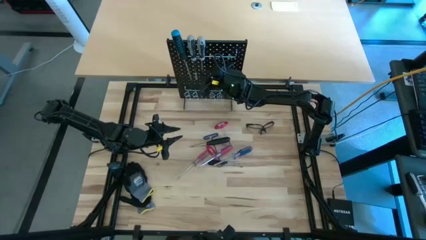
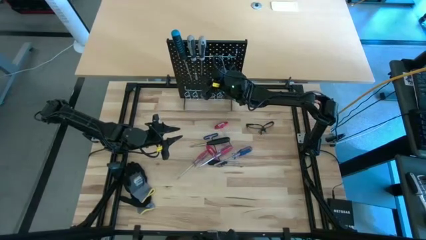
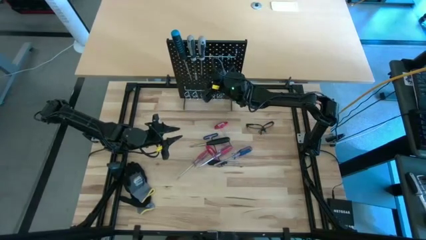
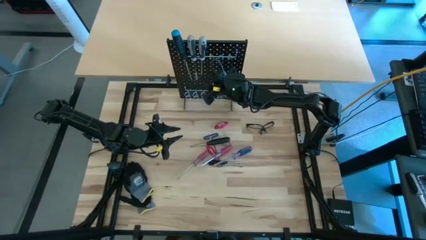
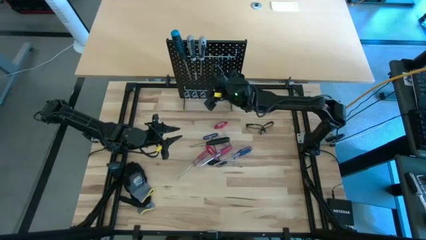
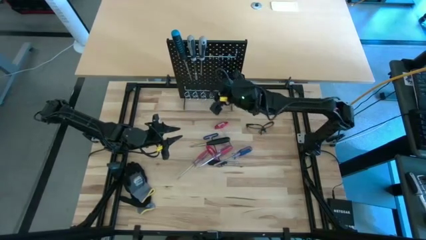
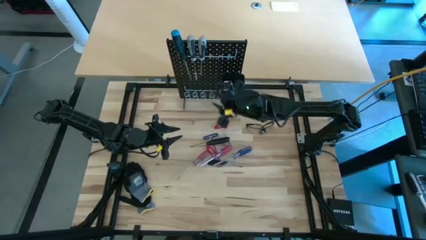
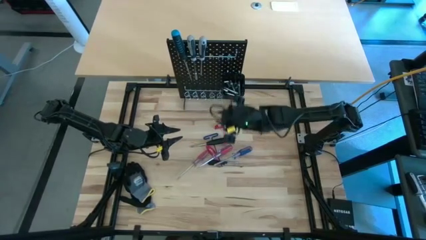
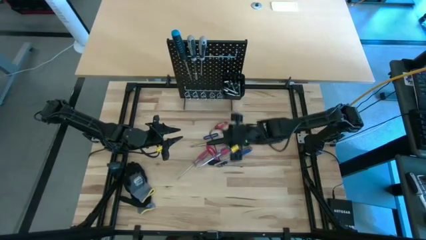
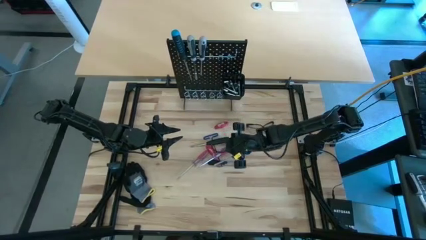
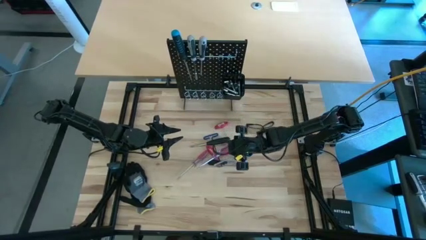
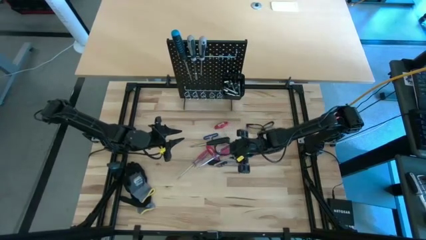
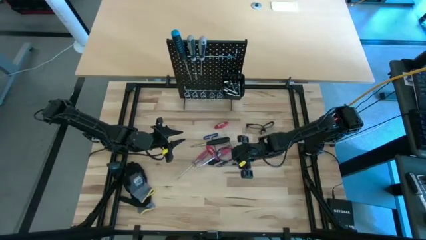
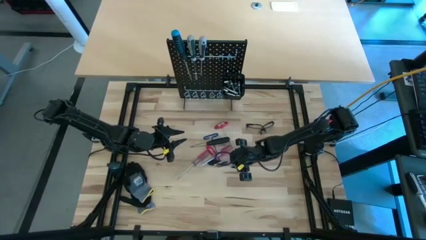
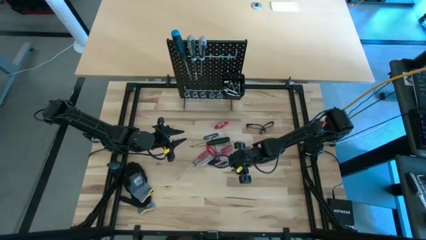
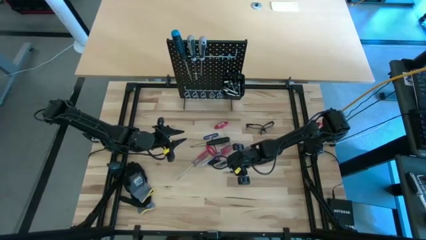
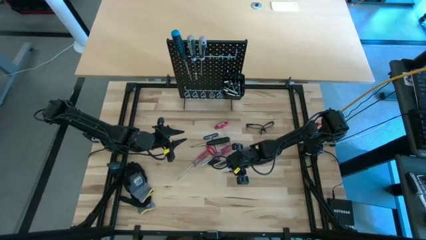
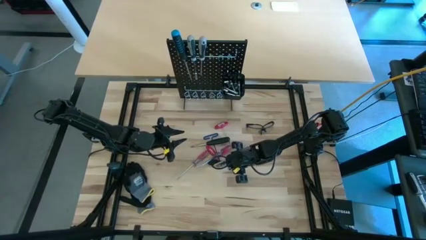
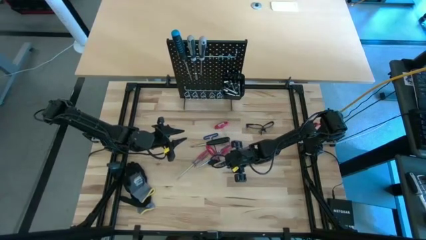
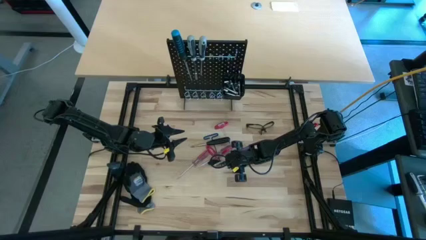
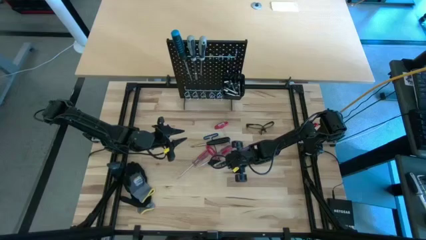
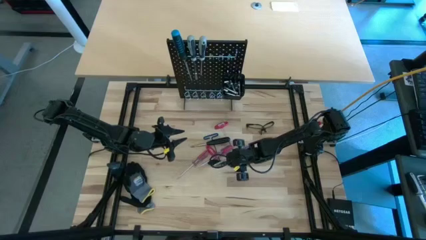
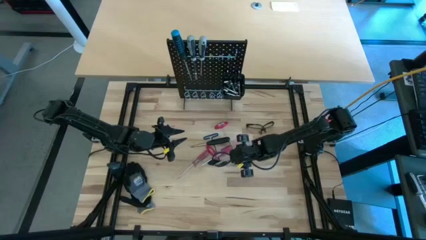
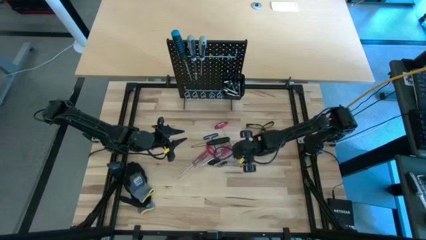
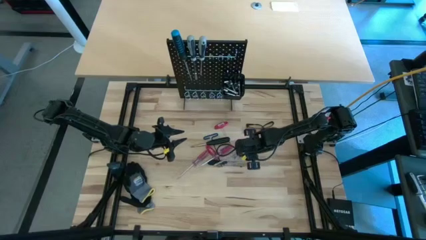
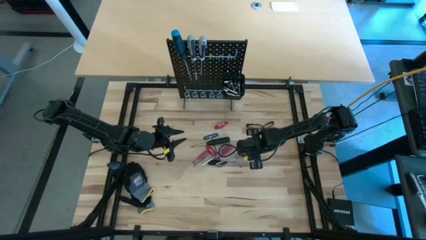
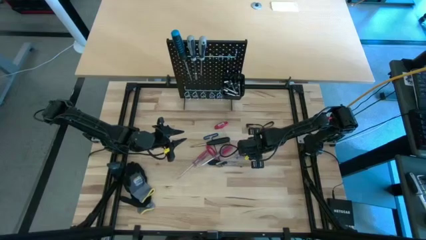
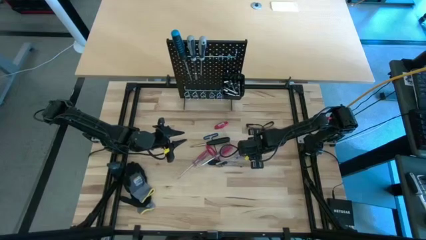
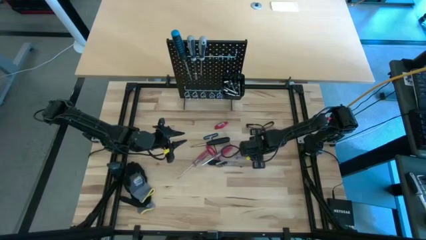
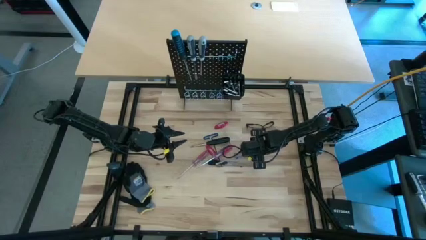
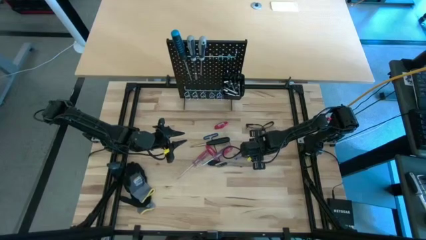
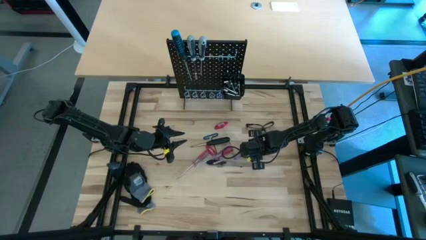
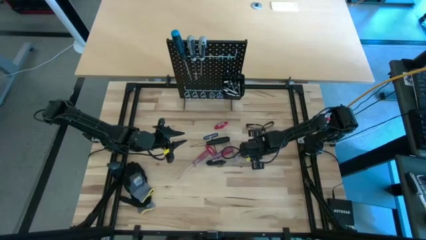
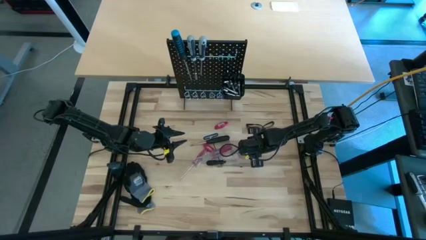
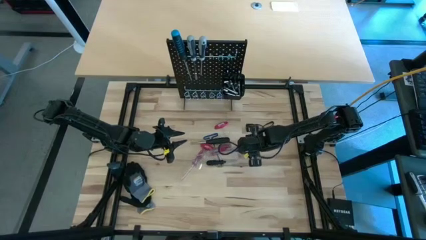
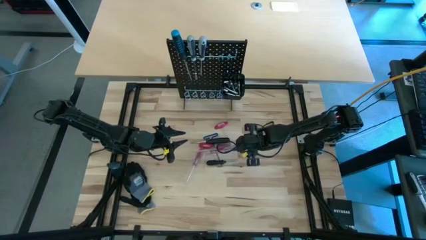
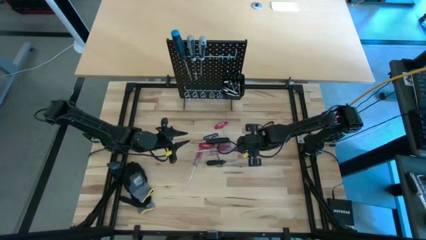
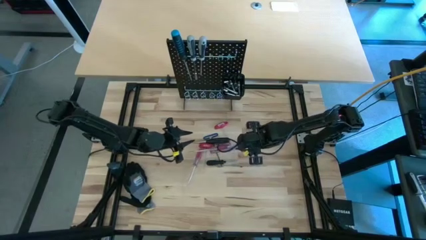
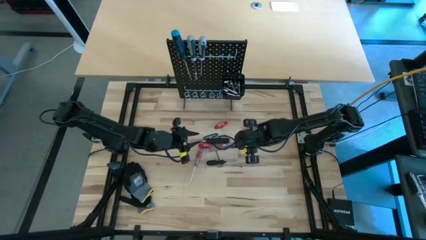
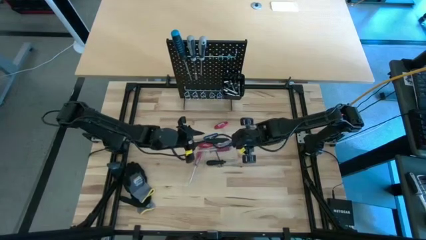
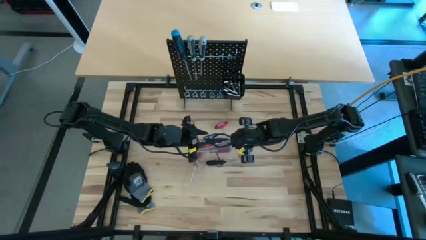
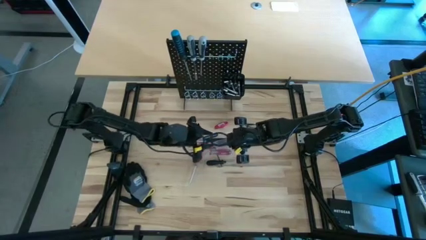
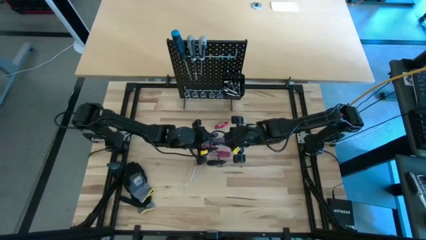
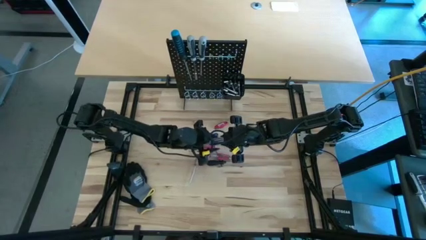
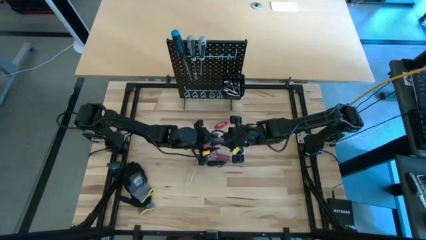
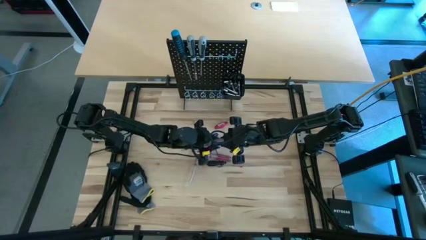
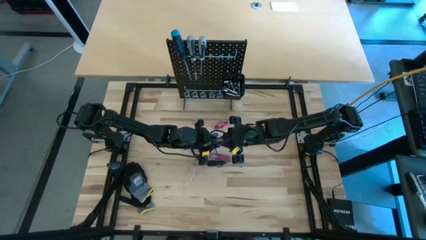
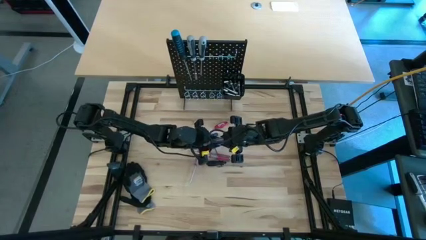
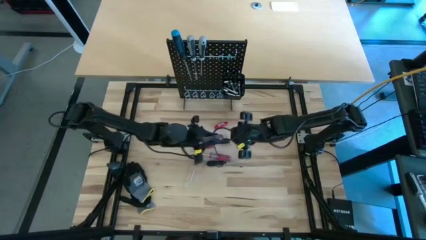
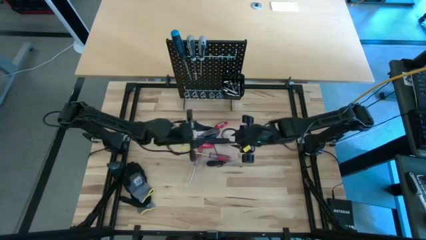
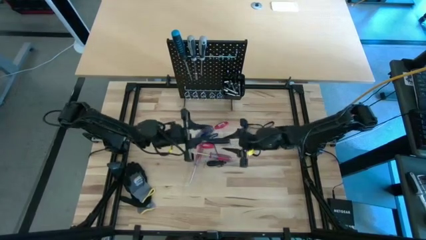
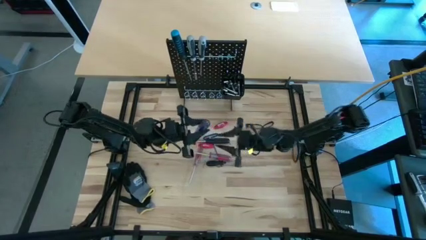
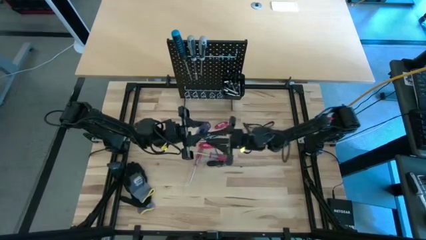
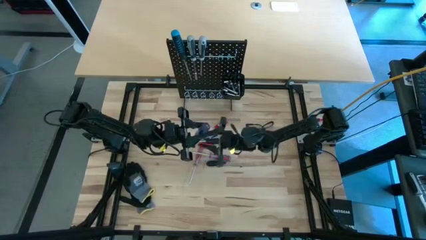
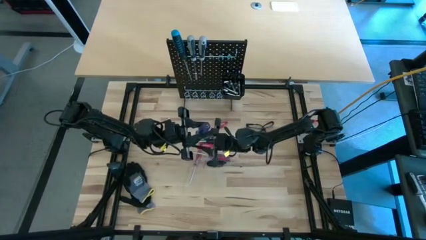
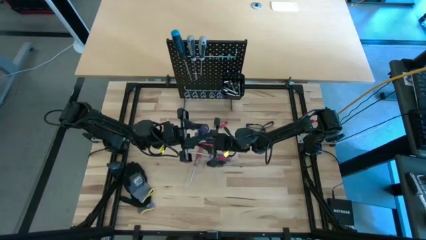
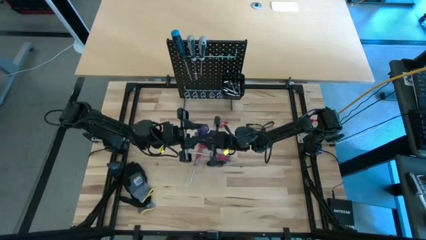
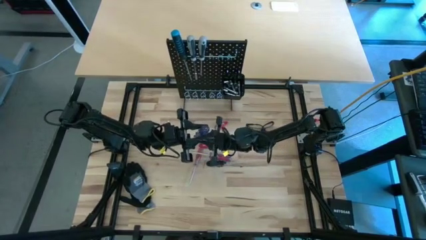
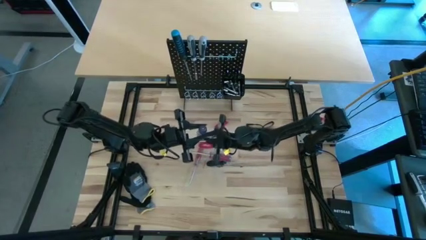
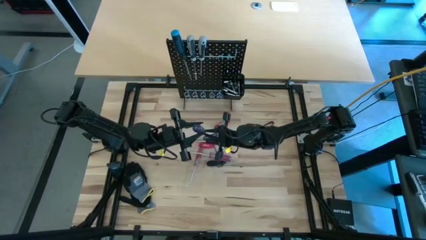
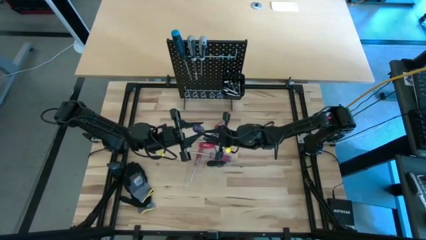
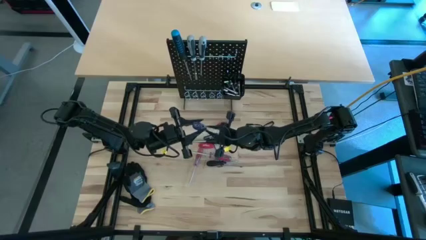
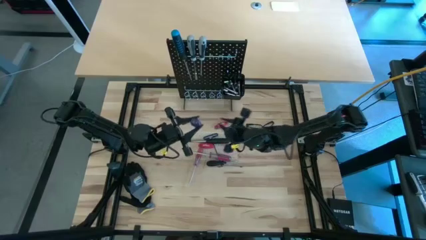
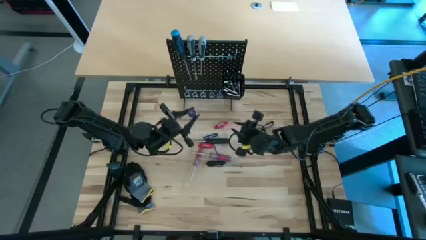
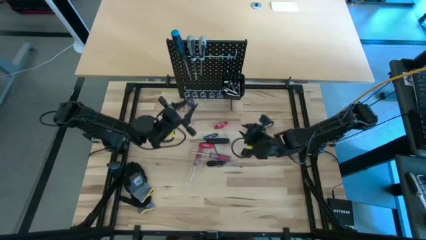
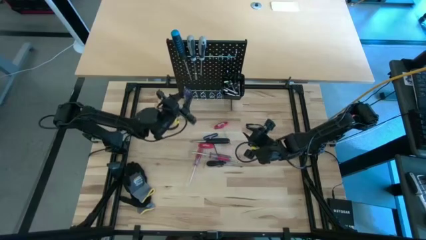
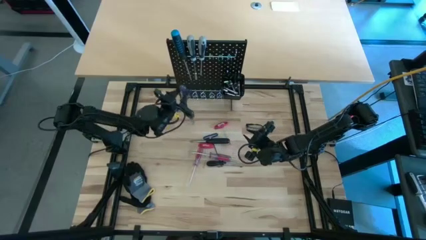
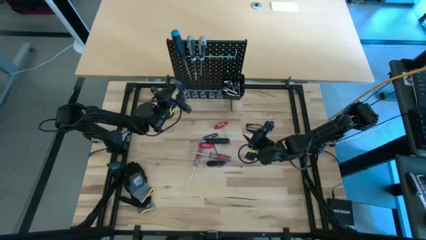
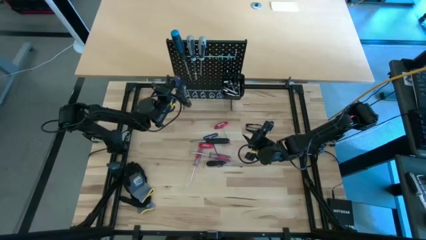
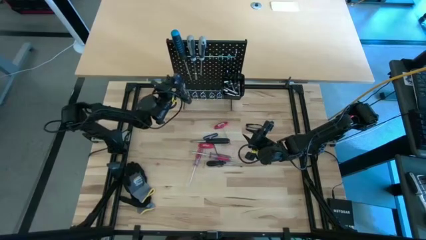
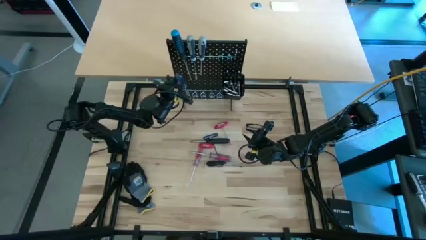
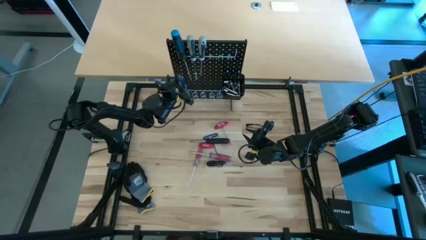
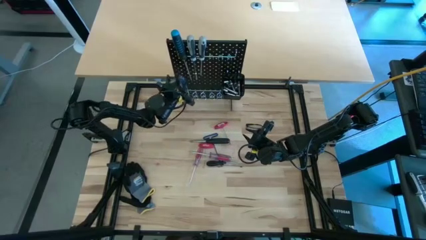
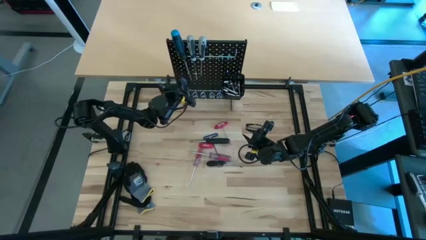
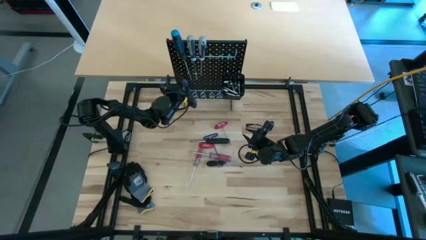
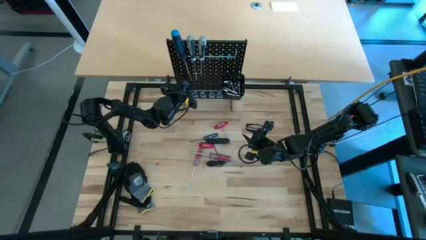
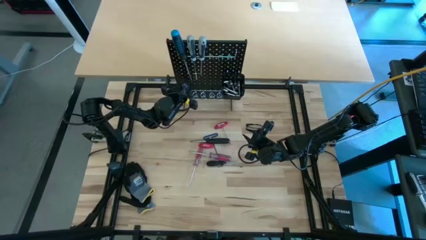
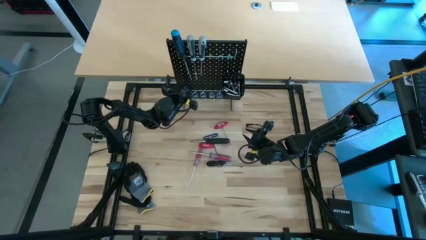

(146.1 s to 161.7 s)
Task: Hang tools onto peg board
Hang the blue screwdriver on the peg board
